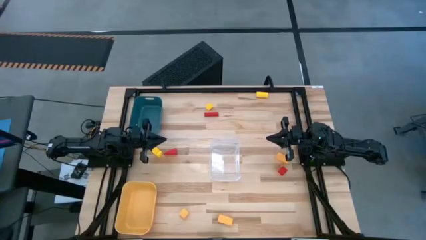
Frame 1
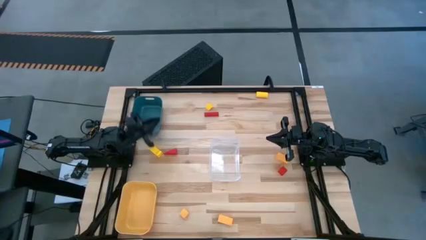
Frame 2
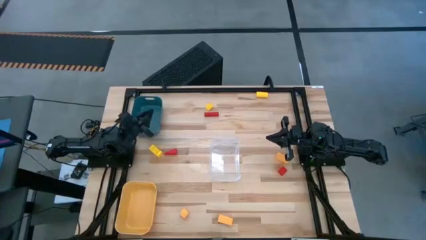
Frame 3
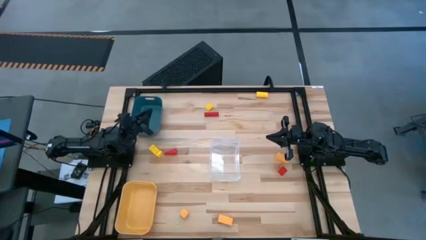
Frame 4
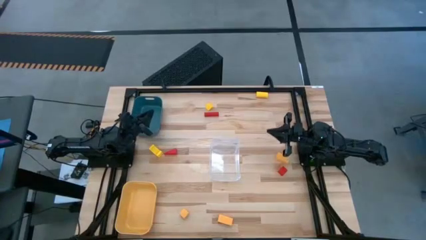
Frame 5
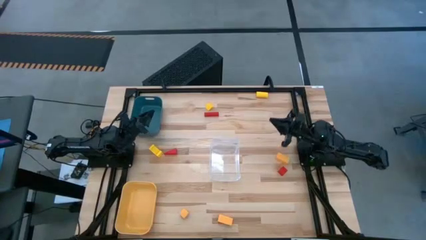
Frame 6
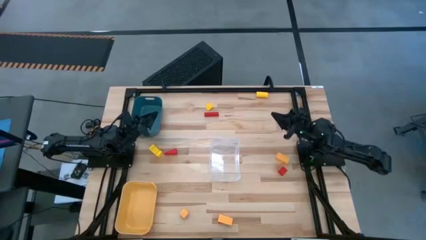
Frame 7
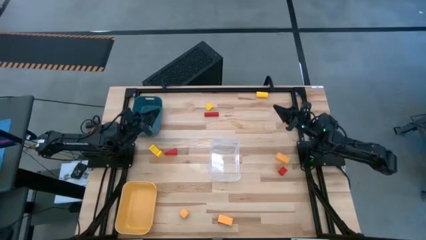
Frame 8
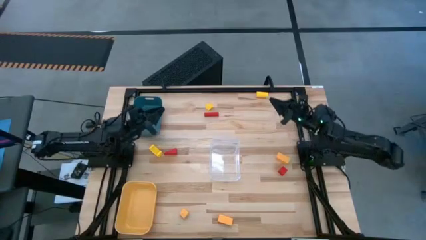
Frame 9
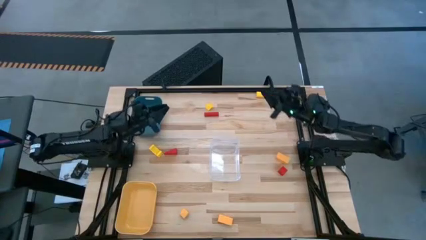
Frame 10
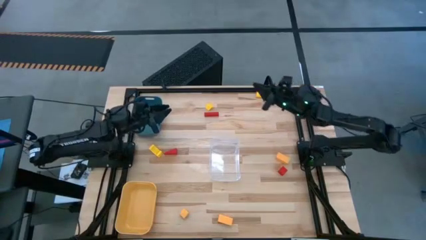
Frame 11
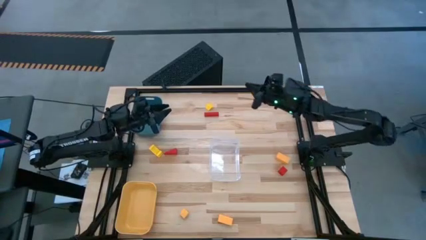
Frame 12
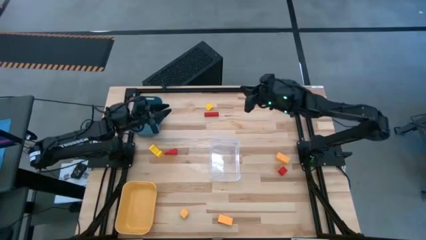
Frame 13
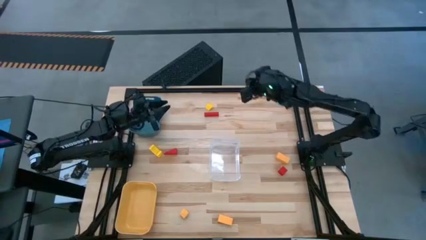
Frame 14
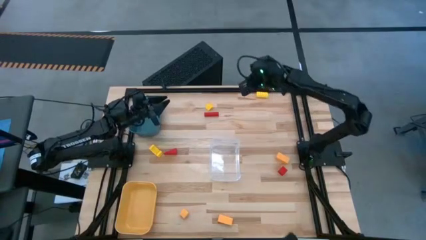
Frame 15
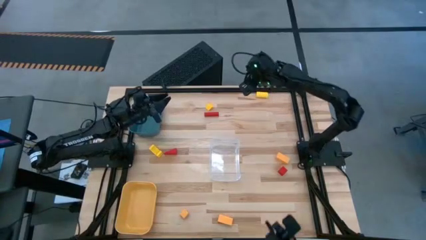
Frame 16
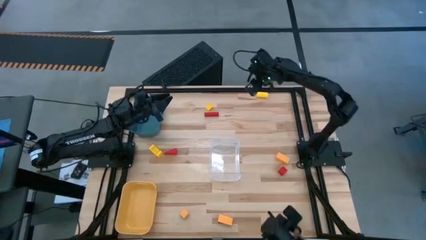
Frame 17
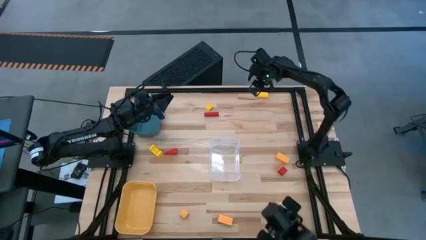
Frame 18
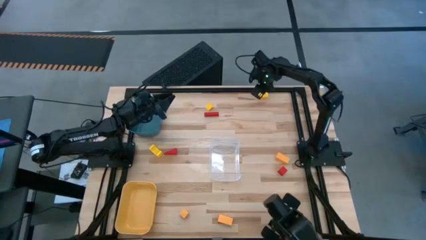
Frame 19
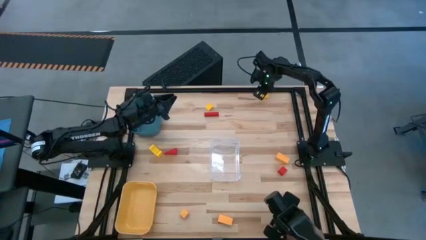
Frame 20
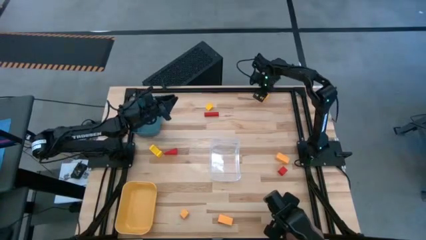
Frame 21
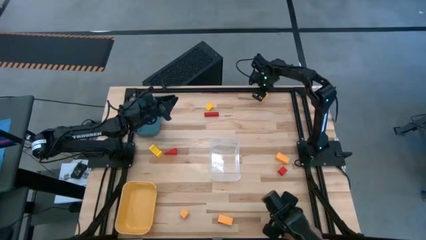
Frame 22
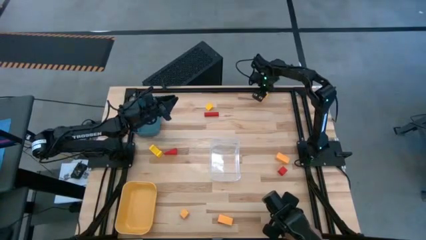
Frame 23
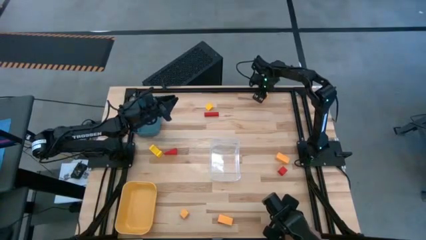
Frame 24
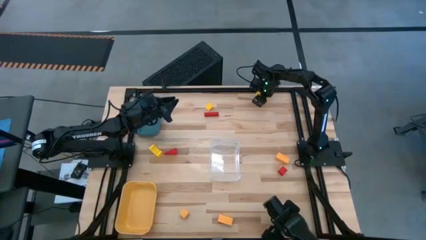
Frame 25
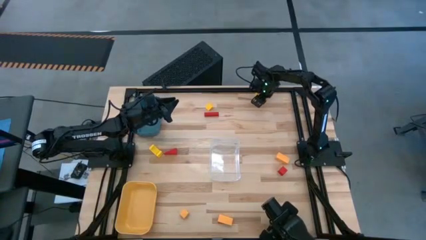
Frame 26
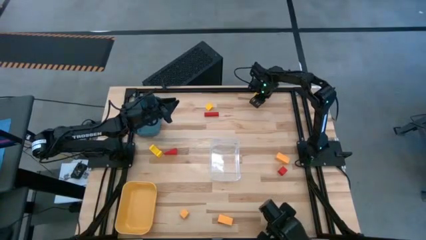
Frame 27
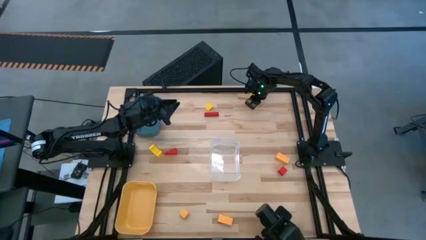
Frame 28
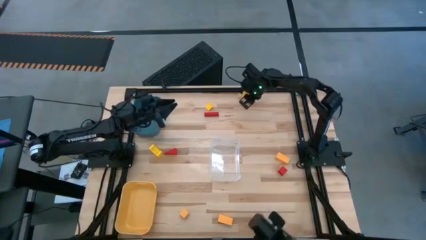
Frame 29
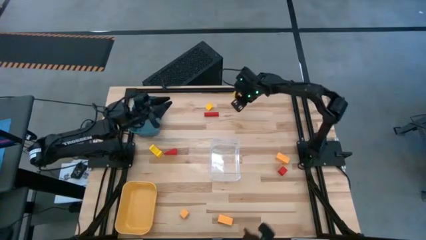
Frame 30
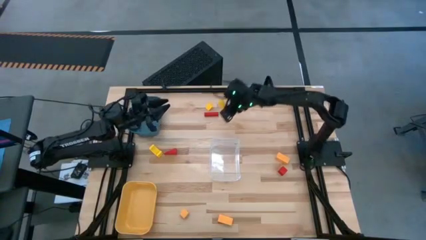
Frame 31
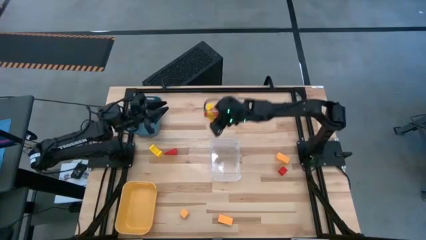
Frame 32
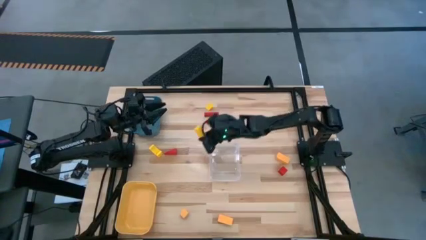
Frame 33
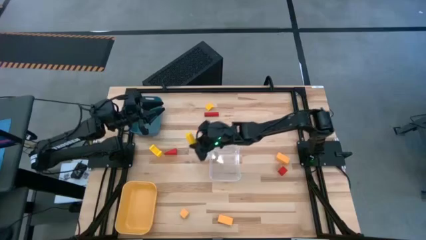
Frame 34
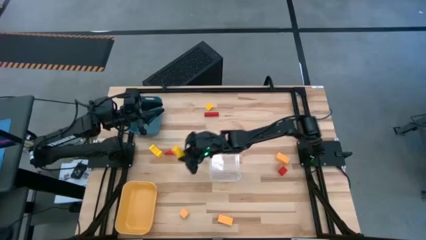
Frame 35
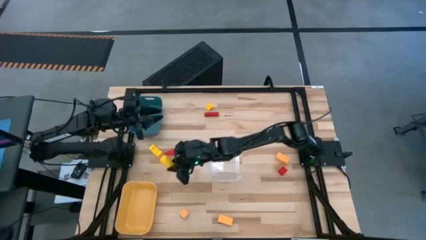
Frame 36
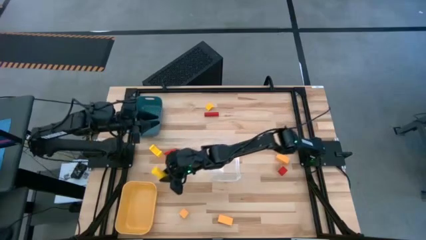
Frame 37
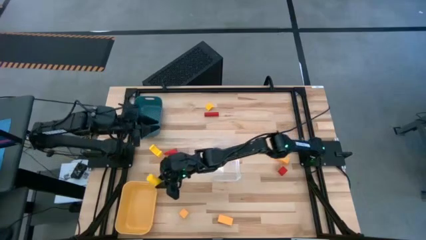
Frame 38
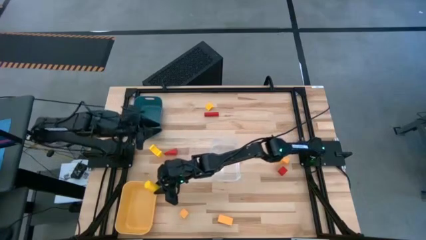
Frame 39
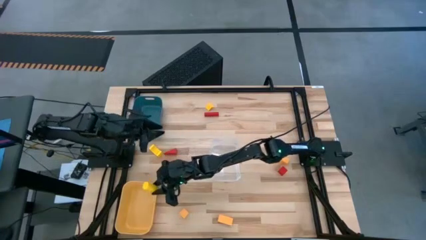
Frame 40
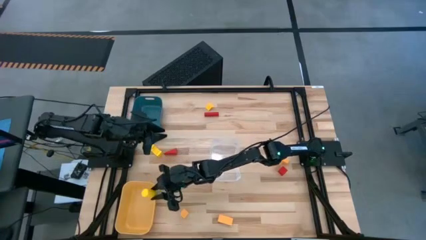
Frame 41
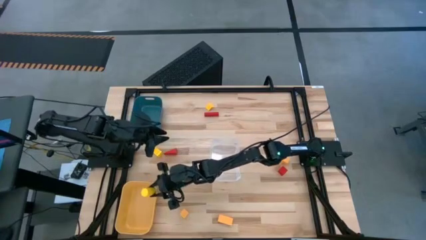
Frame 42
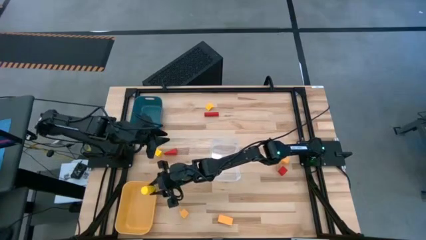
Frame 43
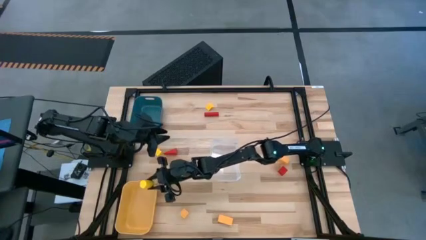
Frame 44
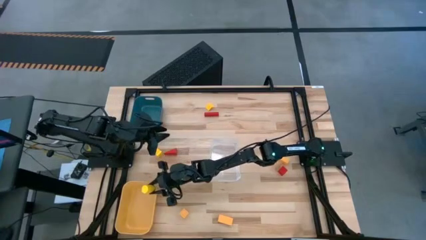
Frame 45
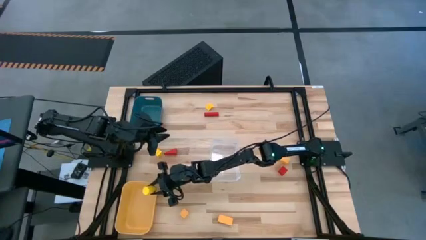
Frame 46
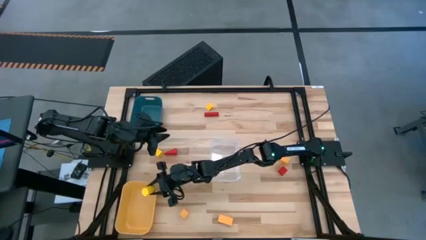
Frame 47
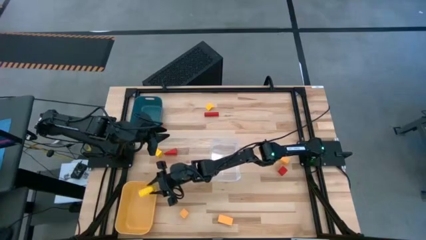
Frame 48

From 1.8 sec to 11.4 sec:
Task: Sort & place blocks by color
Put the top yellow block into the yellow bin

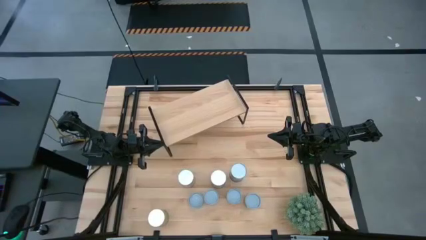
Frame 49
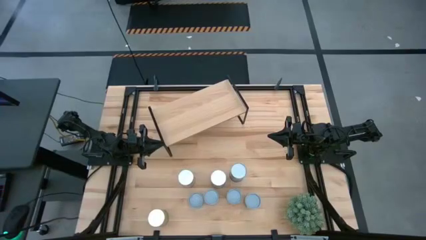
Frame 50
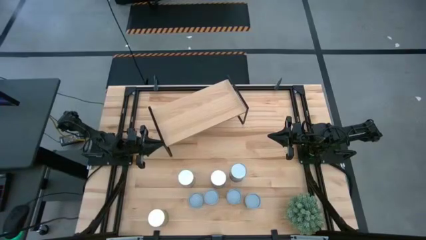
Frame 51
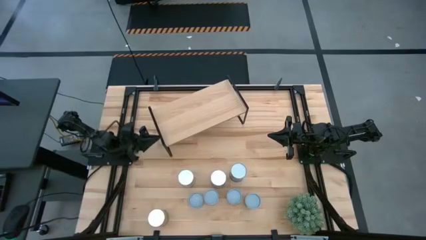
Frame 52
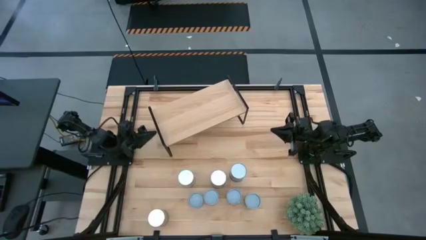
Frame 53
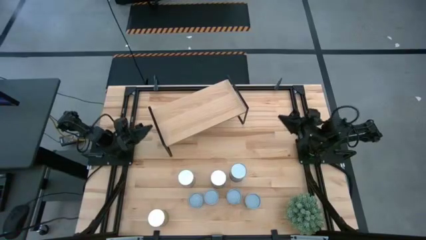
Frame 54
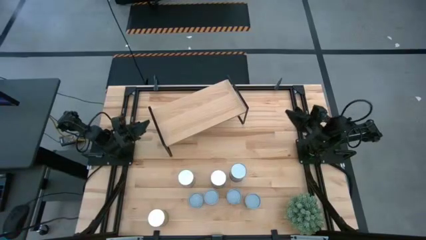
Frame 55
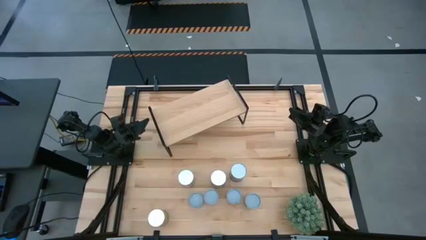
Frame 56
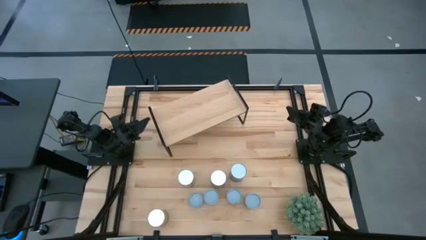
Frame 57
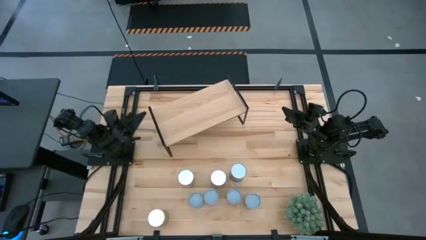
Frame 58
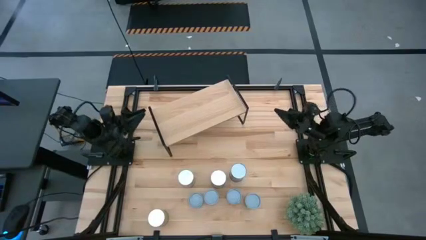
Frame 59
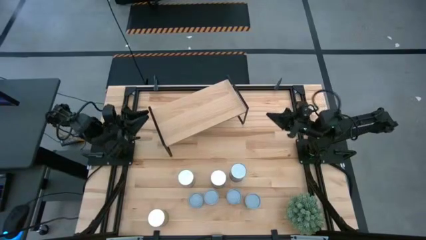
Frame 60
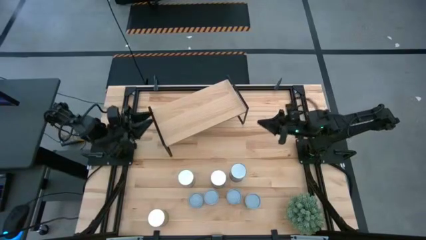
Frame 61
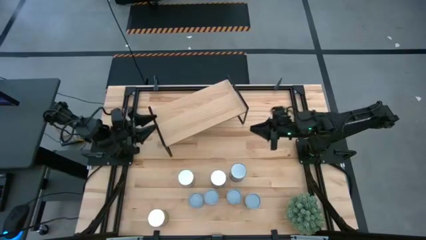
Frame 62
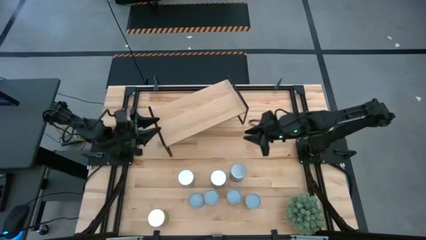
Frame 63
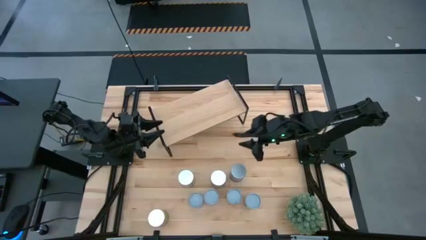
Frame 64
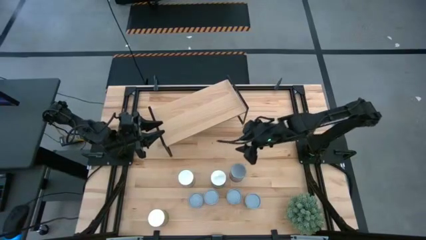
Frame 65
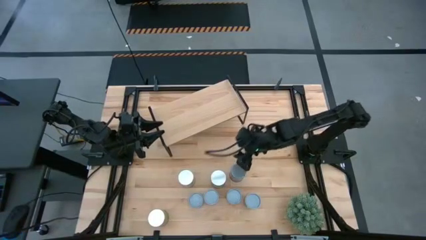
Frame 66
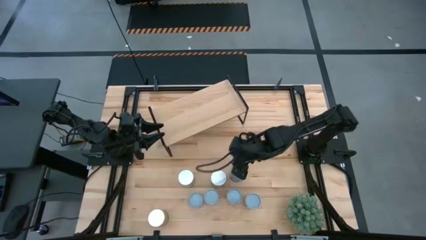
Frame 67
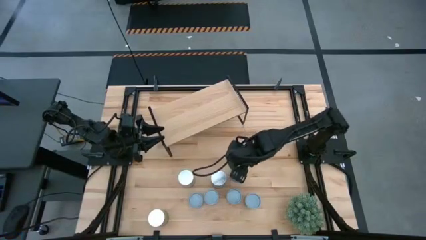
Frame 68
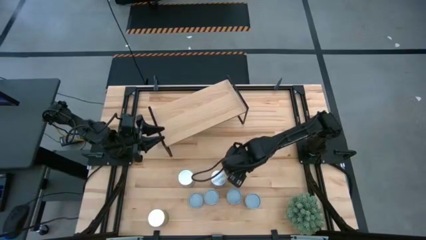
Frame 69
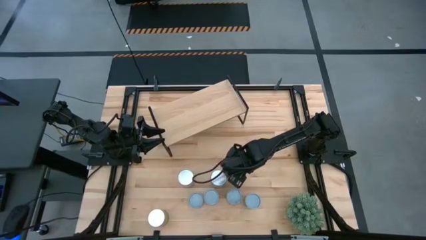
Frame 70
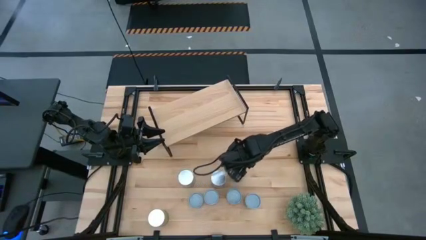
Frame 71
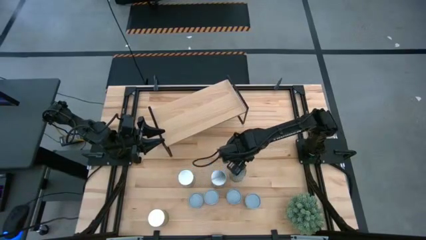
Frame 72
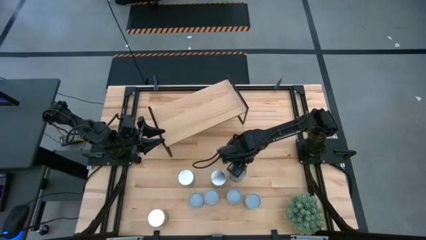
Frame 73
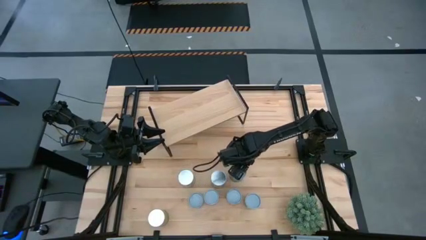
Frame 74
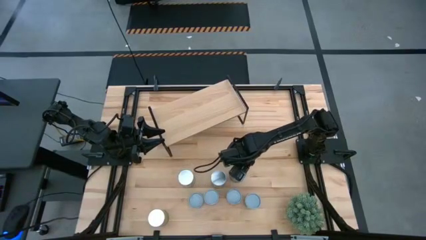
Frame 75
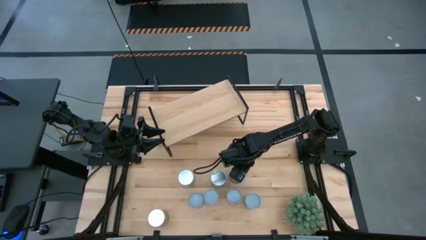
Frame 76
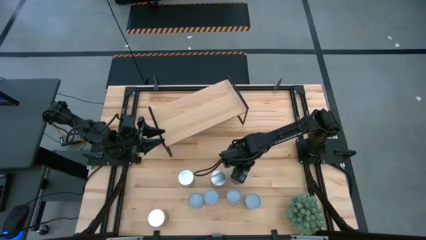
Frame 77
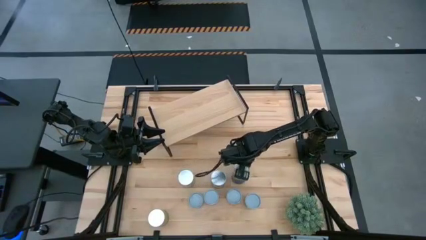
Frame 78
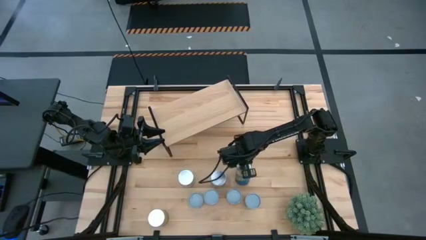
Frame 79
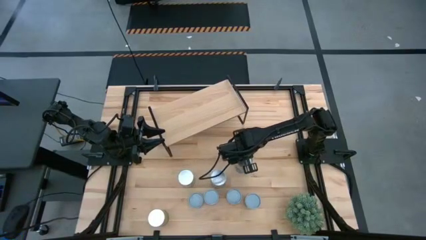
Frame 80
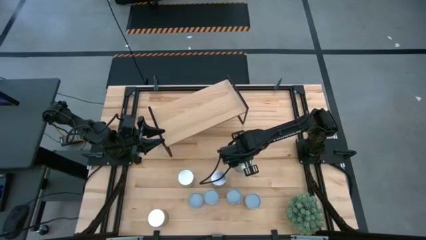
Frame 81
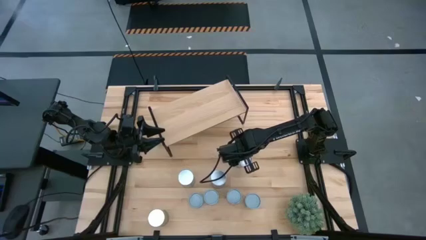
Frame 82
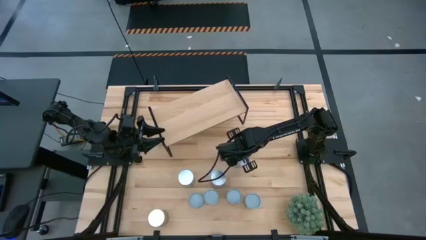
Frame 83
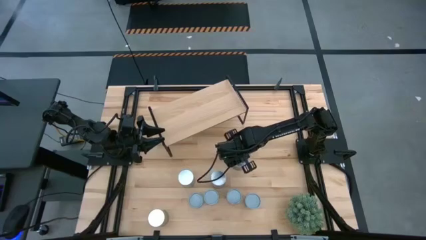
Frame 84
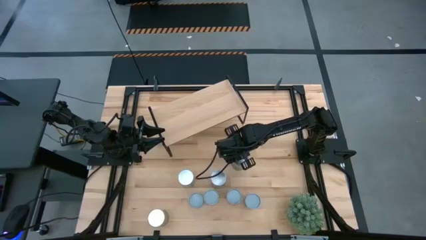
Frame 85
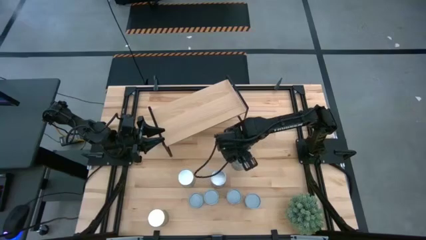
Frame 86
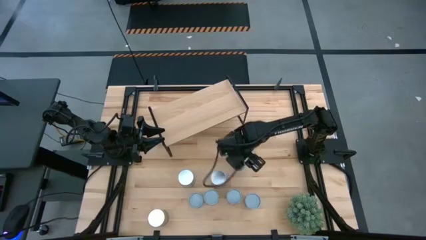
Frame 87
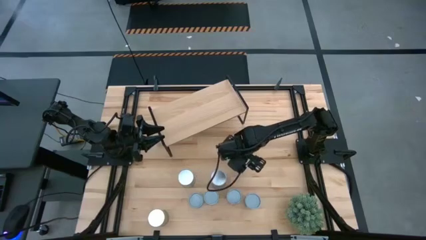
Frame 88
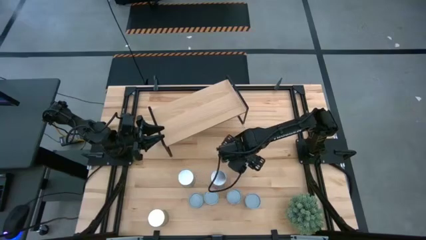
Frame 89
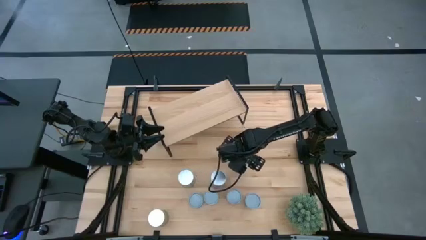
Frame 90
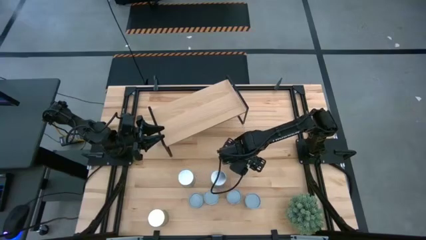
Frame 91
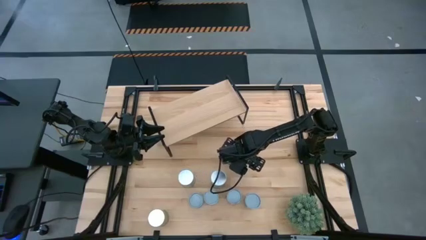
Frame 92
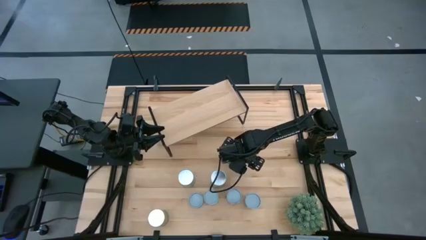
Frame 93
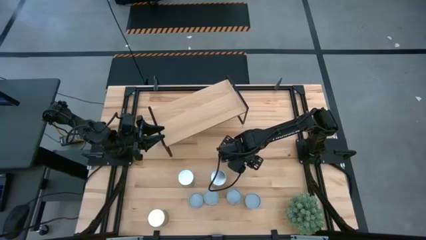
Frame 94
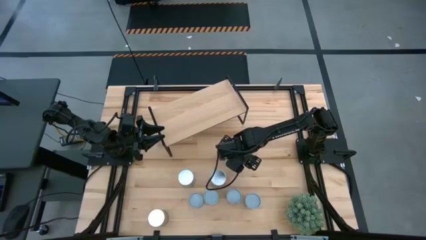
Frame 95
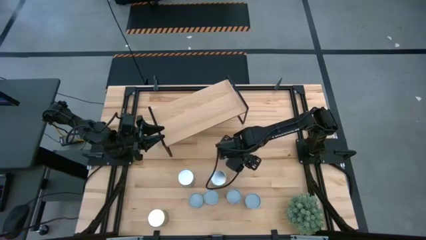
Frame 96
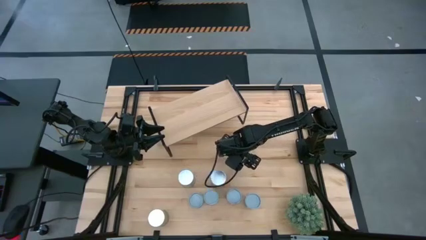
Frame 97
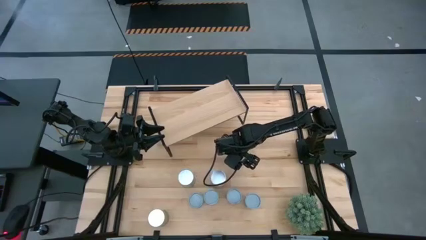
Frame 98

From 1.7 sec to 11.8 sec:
Task: Pick and place cans onto a shelf
Put the canned peas on the shelf
